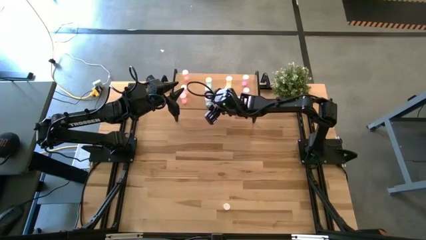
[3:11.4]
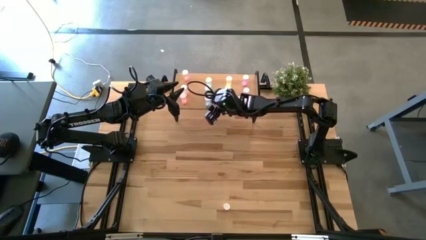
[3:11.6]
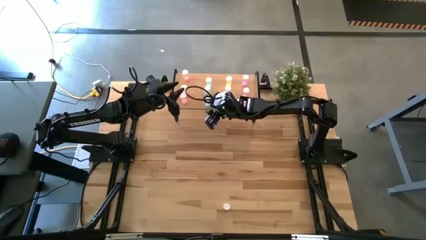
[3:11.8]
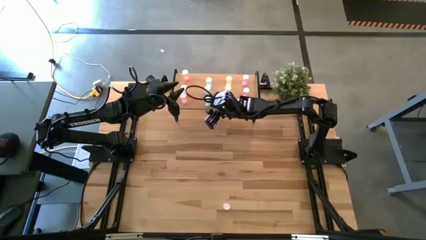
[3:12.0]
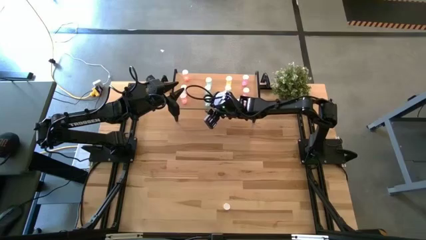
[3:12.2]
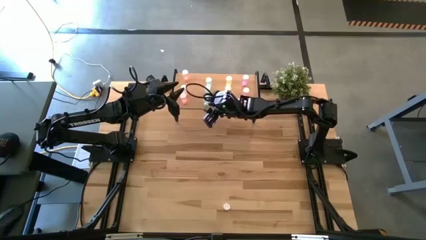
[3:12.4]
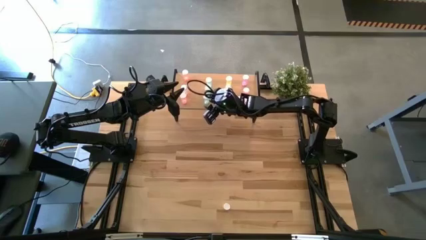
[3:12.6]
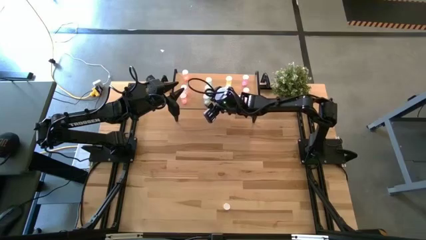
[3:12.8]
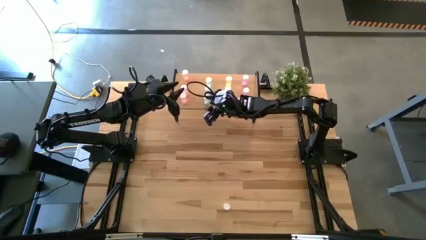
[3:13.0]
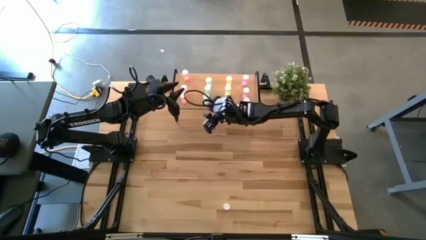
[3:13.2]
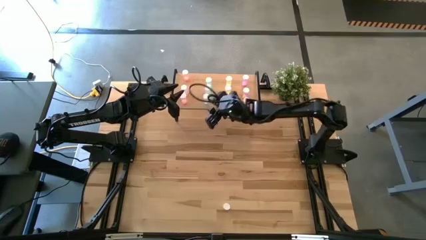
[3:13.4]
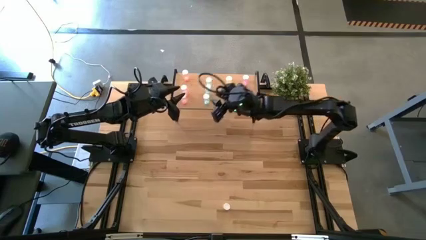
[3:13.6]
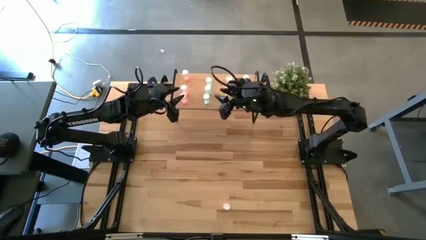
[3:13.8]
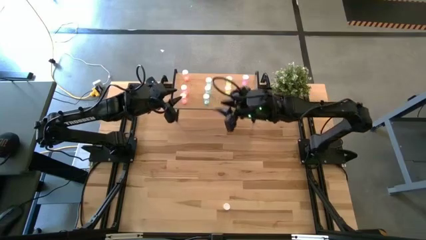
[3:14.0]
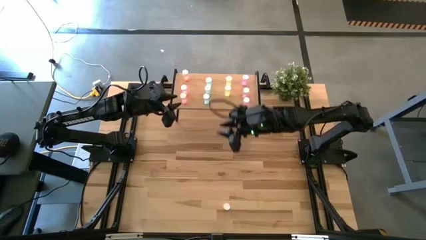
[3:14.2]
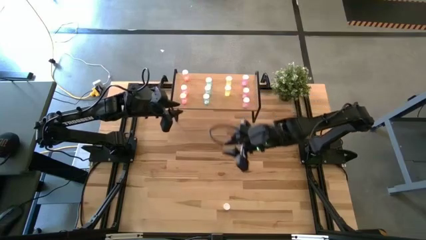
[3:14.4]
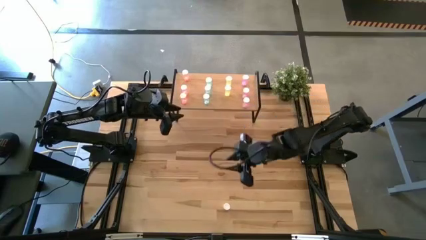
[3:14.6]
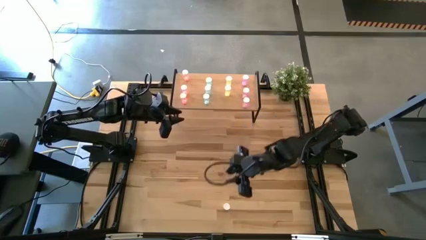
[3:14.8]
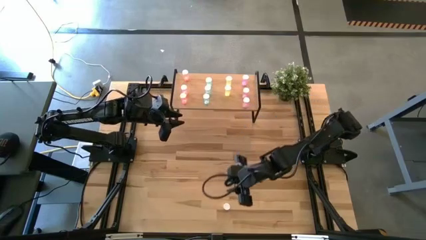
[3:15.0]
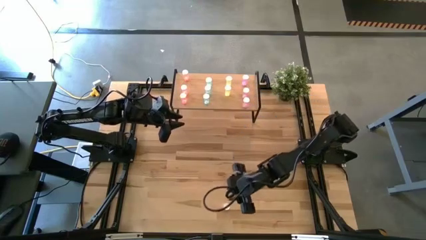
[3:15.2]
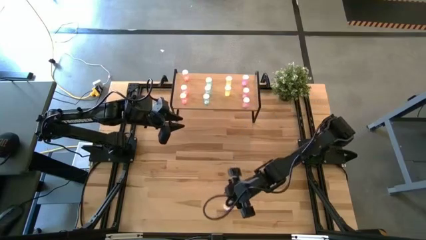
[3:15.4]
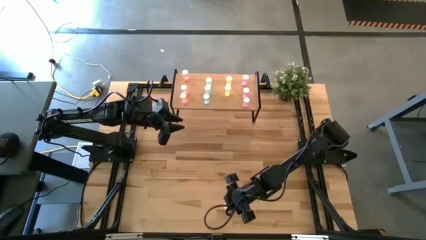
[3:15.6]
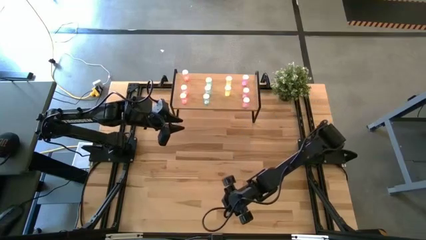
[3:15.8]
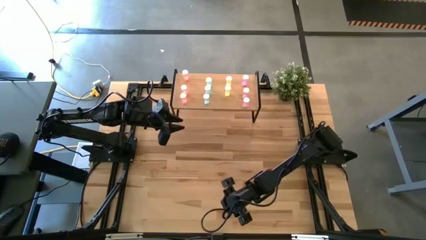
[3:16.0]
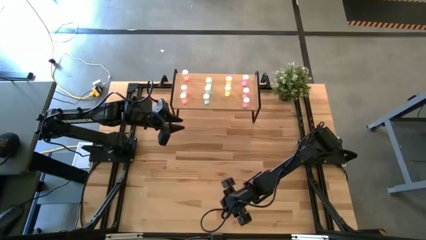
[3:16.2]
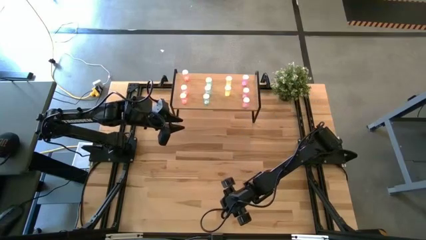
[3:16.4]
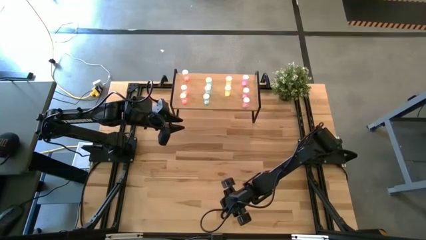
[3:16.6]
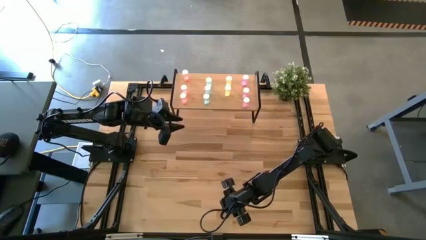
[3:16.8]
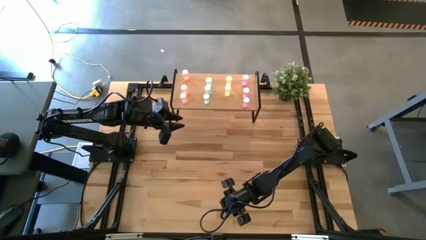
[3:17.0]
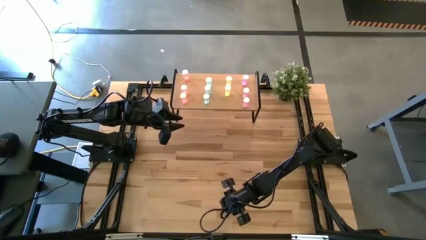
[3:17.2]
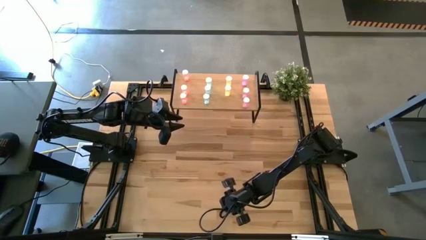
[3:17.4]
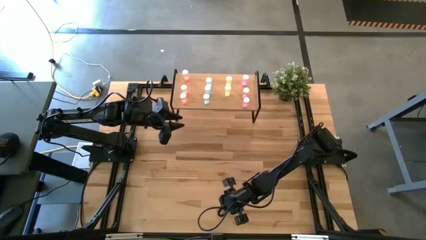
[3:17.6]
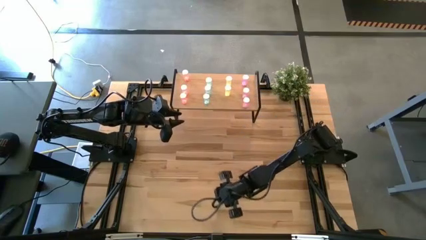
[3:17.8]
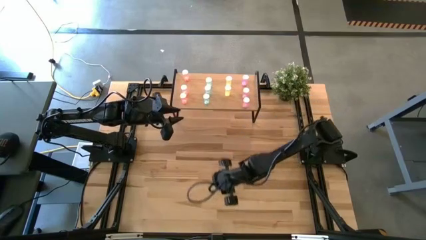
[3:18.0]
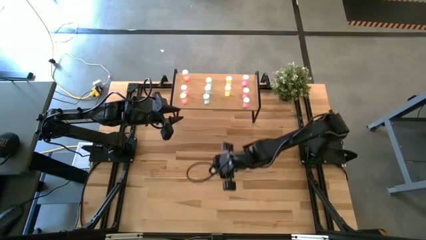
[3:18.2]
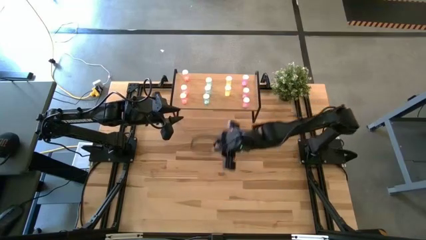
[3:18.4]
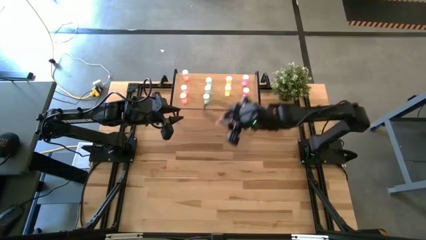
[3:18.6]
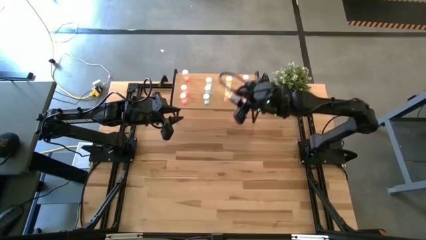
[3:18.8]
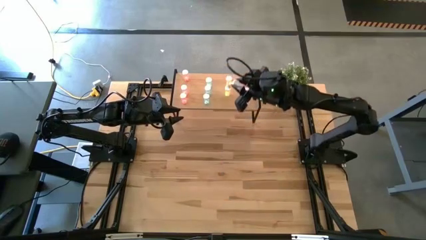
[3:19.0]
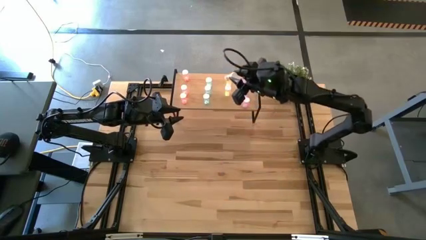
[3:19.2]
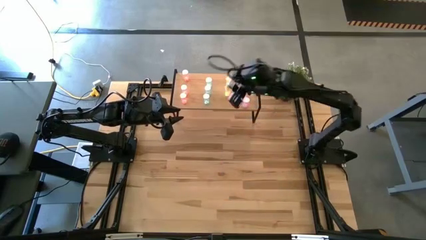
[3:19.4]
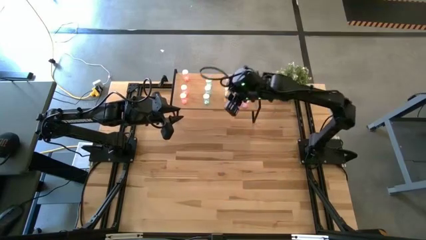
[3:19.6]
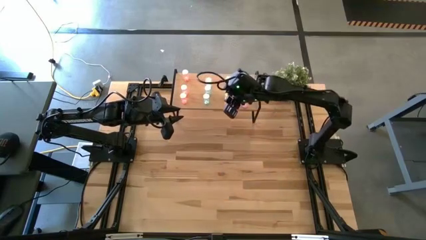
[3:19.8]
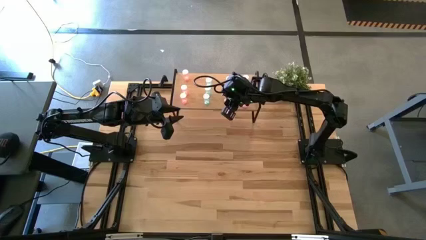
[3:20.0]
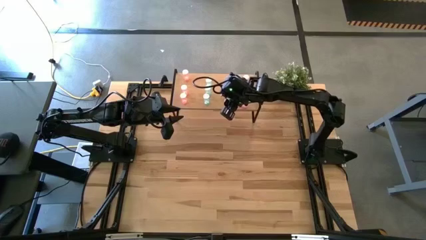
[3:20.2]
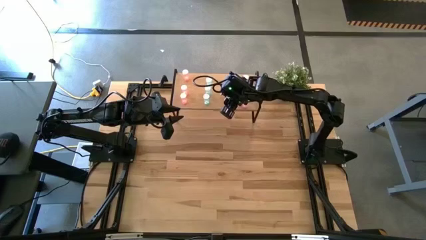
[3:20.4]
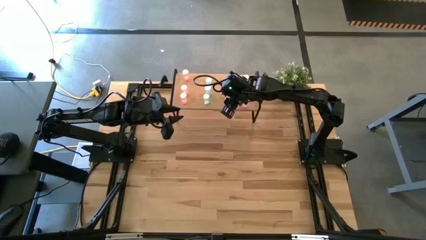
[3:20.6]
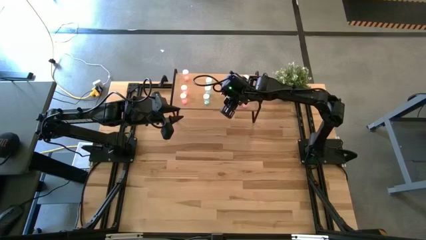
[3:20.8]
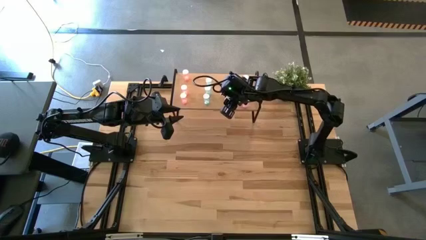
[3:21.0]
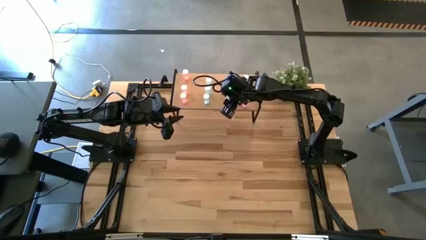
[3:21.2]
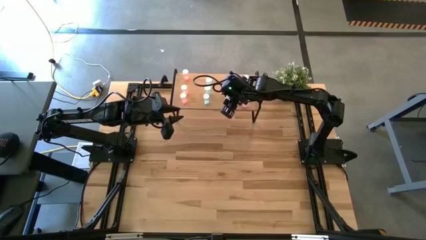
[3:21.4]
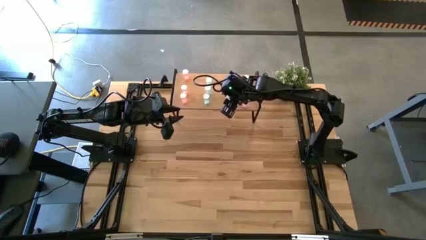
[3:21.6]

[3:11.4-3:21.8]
Task: Pick and place medicine bottles onto shelf by color
Put the yellow pill bottle on the shelf aligned with the other yellow pill bottle

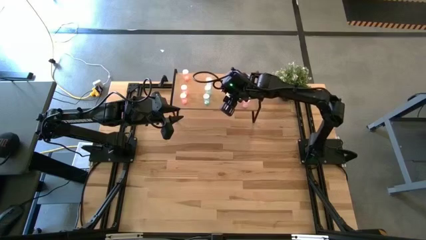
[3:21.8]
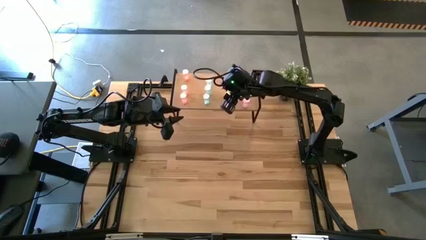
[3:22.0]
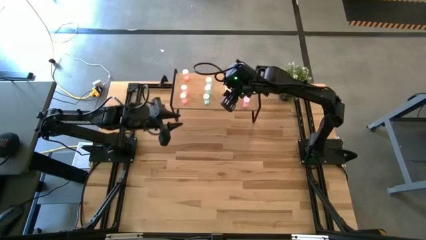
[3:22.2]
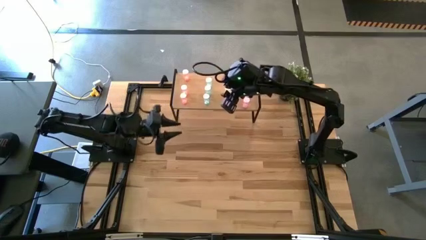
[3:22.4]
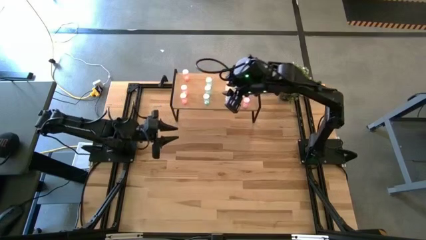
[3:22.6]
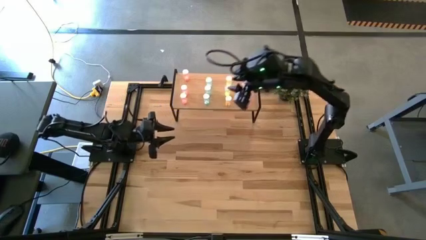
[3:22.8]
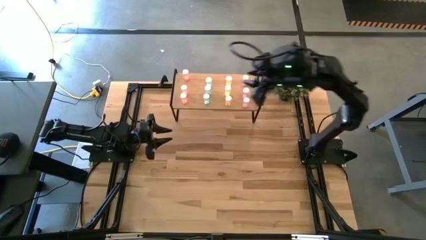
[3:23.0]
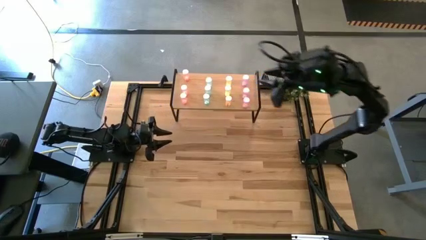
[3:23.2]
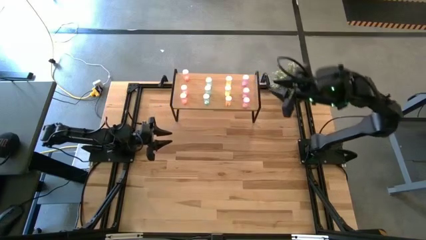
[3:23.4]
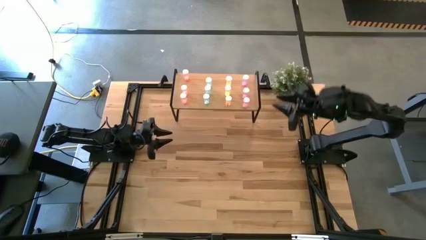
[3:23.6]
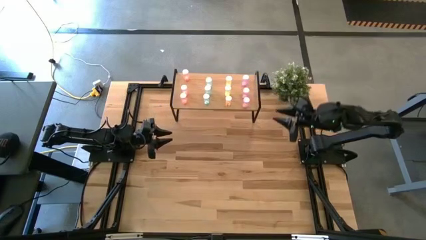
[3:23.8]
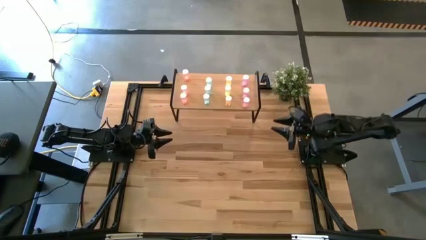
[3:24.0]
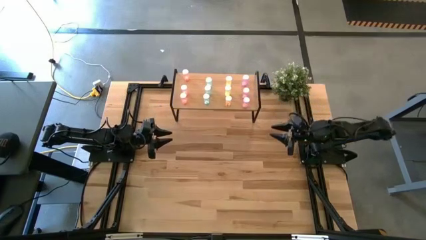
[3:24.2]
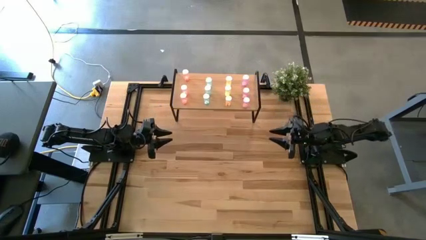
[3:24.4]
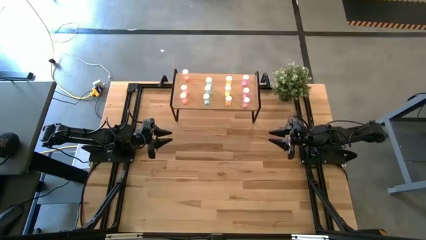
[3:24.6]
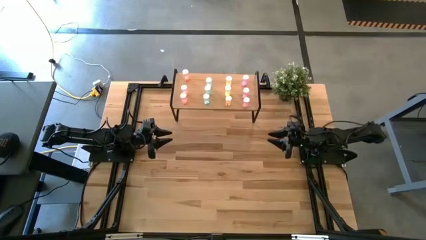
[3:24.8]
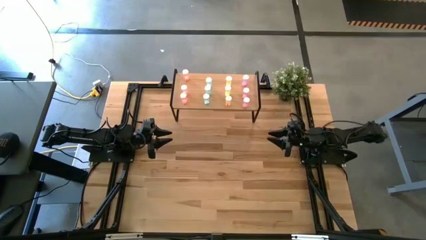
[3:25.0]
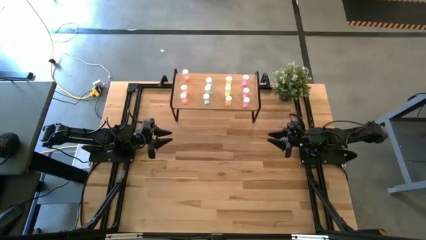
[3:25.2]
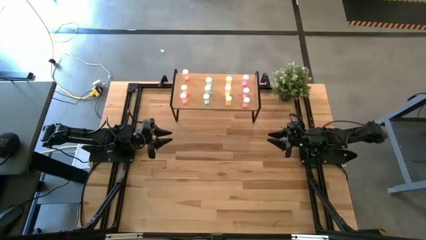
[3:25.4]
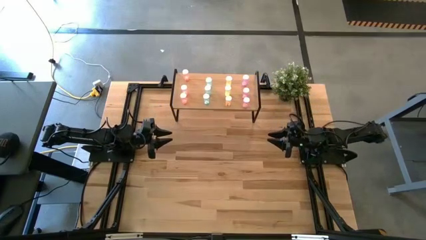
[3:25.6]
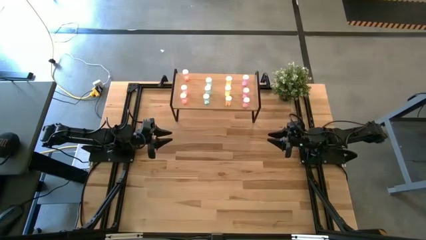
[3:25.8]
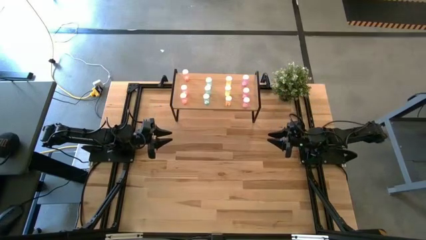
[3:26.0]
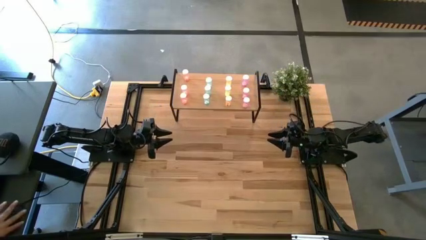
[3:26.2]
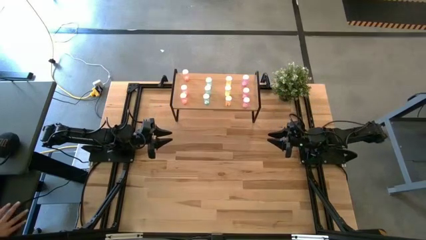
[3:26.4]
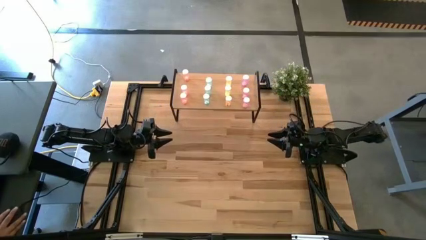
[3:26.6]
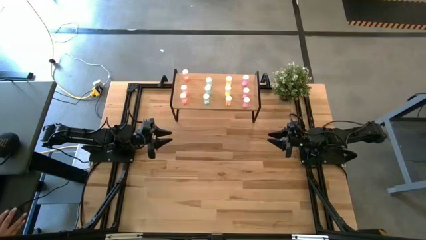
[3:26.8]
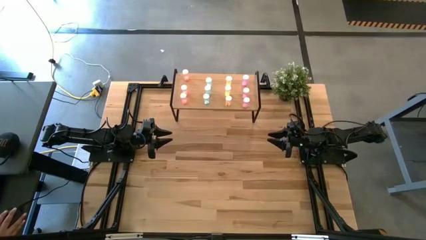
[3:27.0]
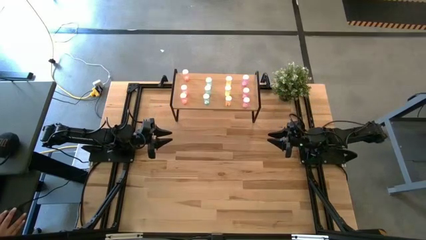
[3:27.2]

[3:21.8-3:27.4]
Return to Home Position
